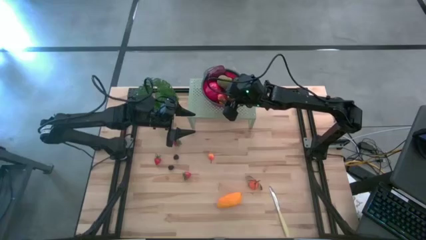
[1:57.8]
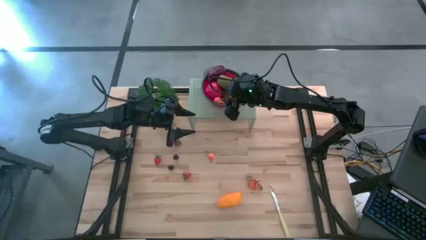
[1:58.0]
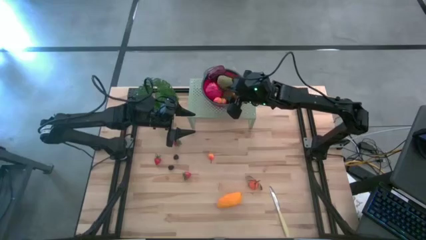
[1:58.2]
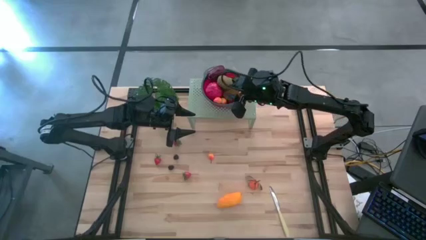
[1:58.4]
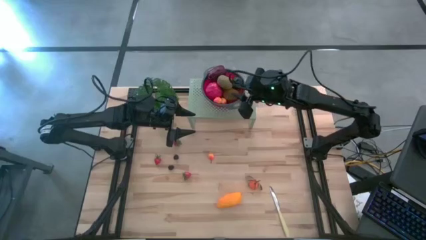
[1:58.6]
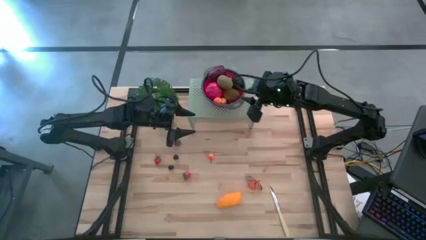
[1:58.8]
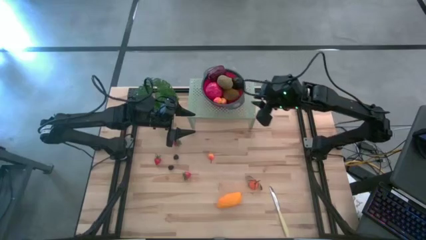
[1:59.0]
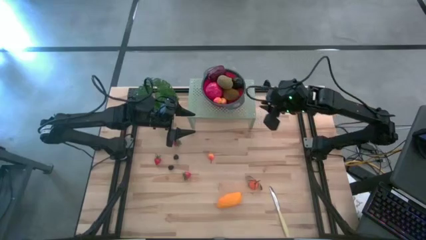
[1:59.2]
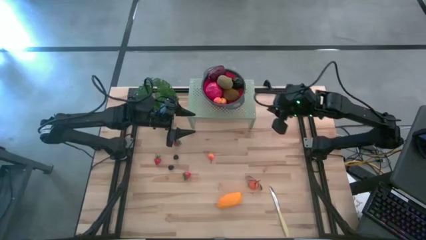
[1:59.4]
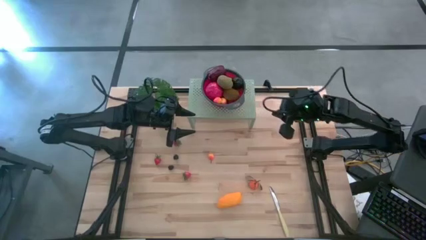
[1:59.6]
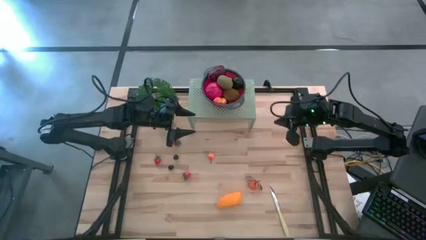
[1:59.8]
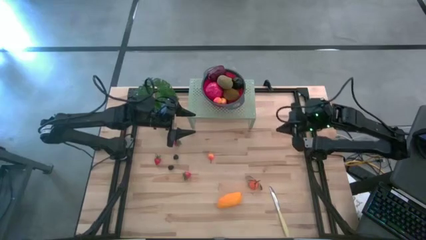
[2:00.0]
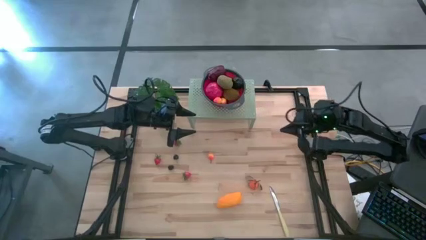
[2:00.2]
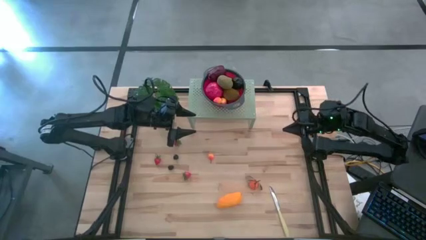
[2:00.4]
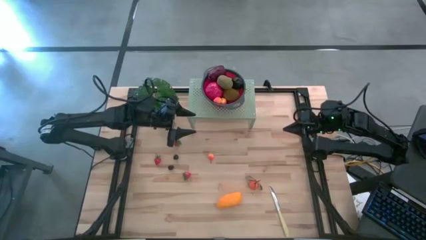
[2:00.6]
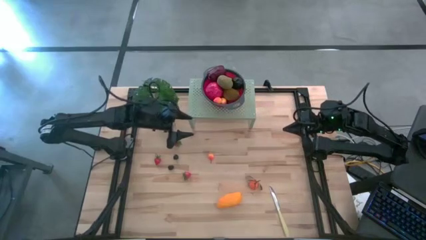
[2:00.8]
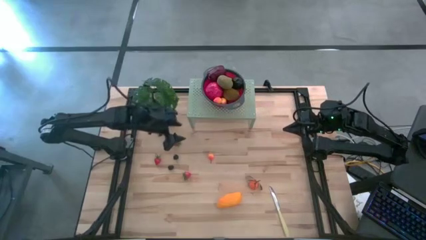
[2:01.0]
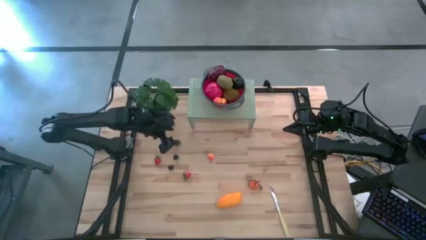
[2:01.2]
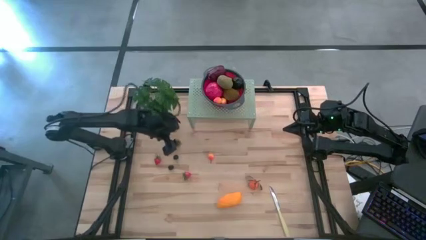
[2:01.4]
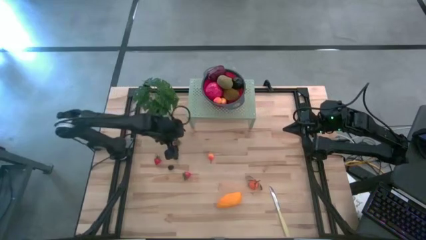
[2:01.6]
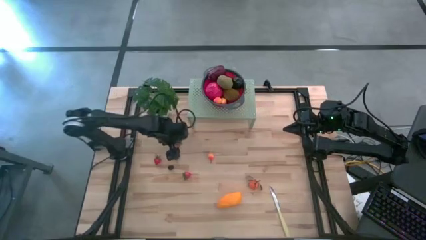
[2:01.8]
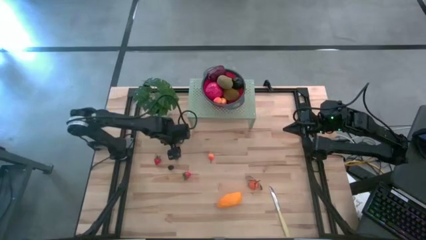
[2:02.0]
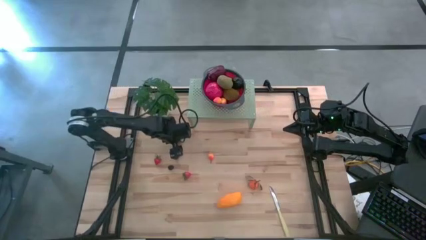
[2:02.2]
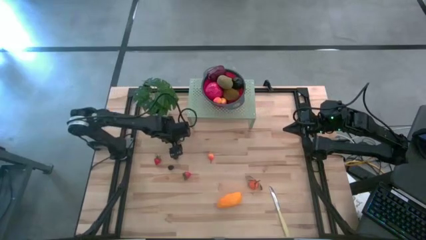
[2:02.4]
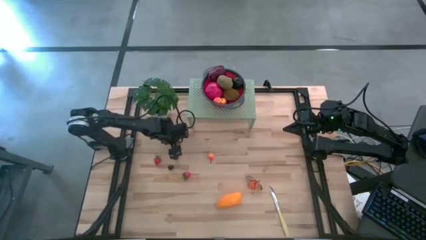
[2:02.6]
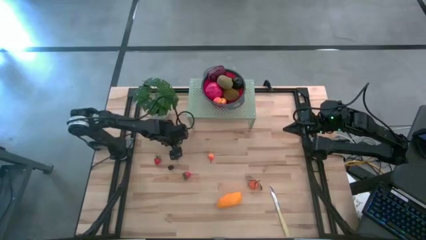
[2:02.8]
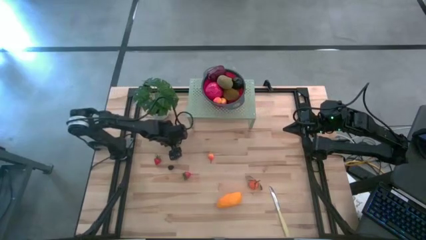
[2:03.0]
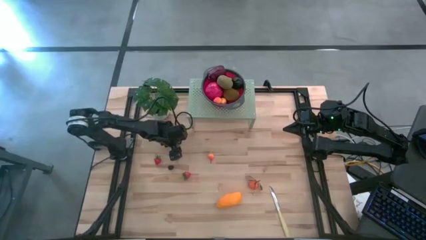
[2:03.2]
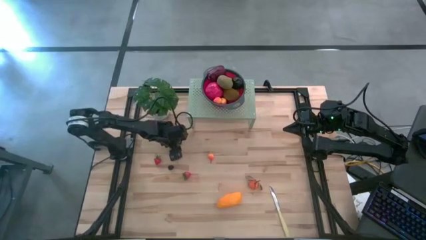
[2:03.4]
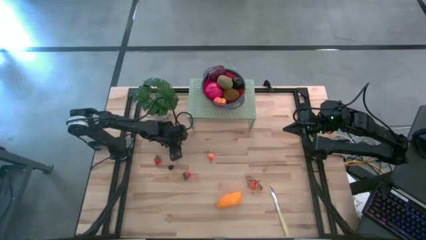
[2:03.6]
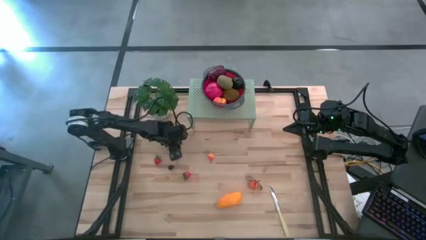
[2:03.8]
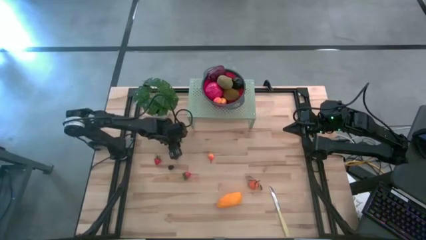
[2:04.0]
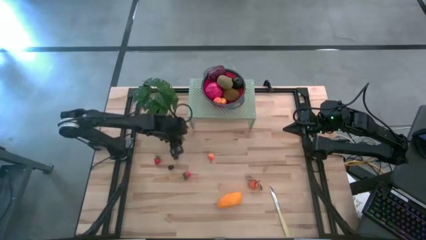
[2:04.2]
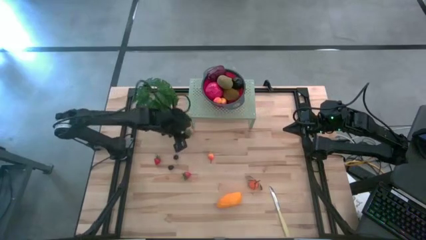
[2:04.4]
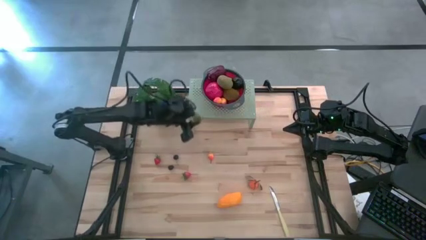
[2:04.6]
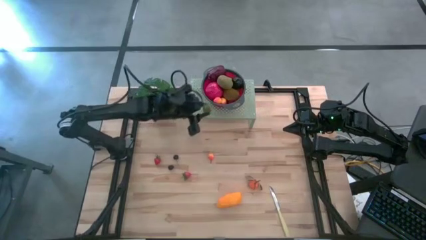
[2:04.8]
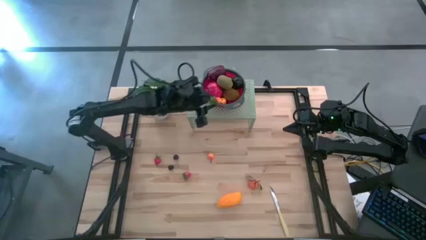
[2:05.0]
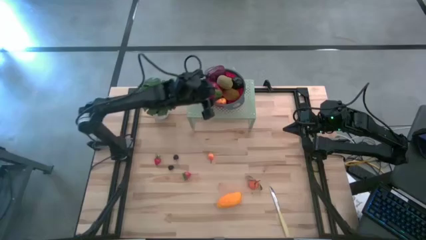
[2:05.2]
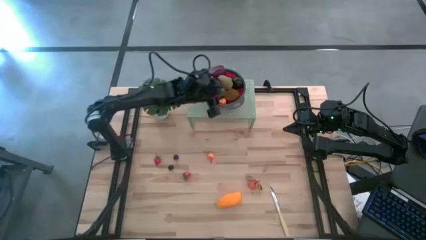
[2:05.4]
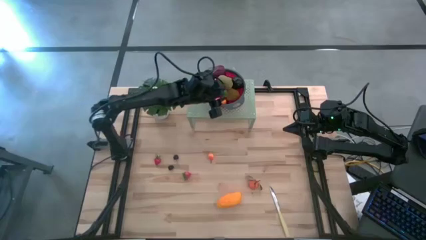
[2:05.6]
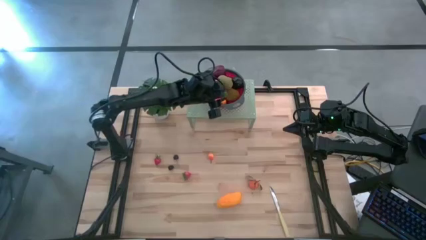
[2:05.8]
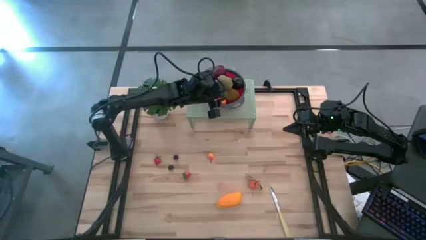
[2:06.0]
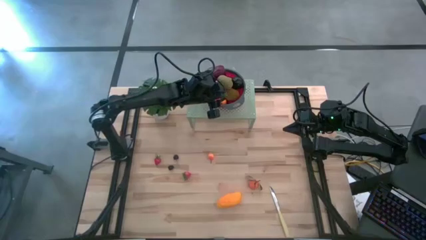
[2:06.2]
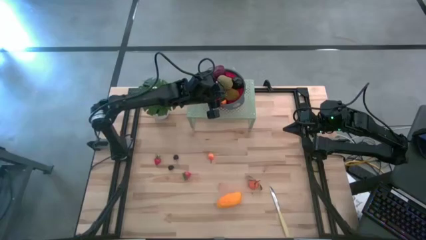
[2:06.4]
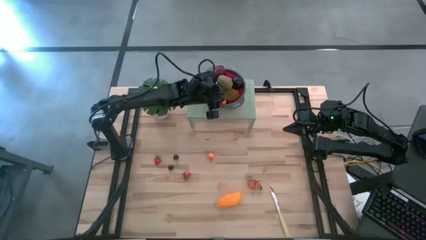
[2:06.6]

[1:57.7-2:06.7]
Task: Pick & Place Fruit
Put the strawberry into the red strainer bowl on the shelf

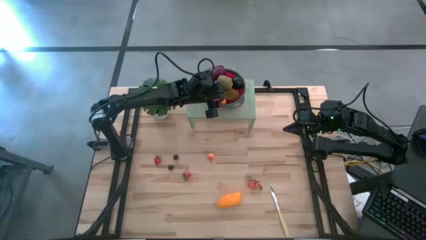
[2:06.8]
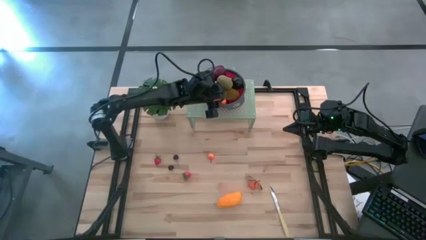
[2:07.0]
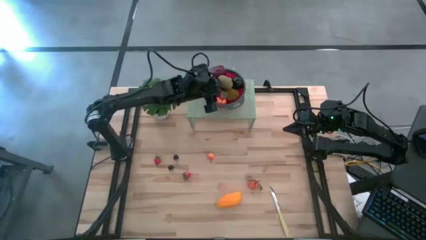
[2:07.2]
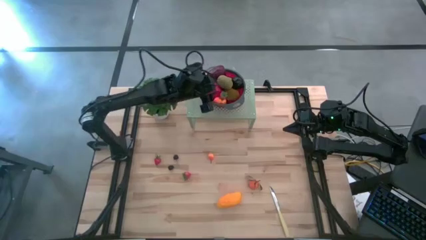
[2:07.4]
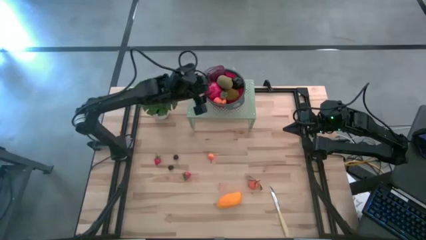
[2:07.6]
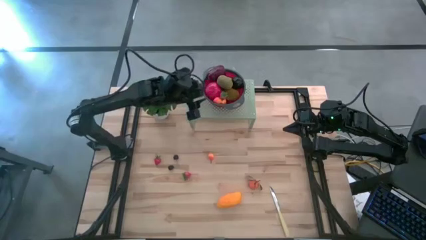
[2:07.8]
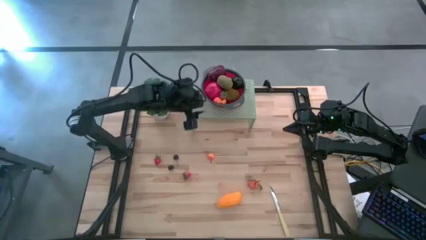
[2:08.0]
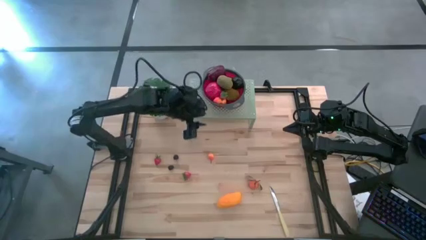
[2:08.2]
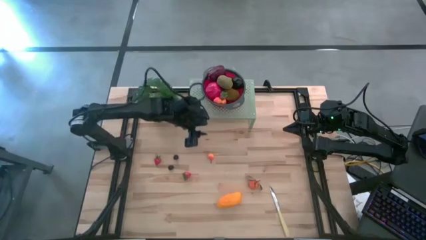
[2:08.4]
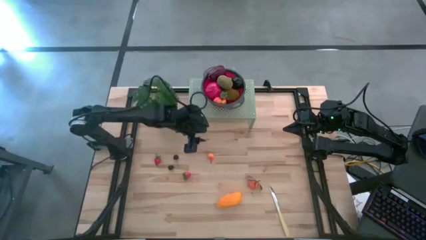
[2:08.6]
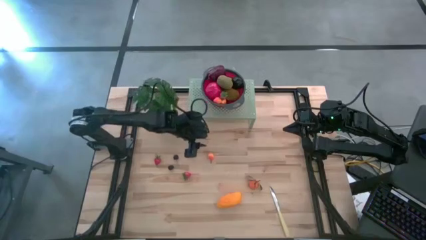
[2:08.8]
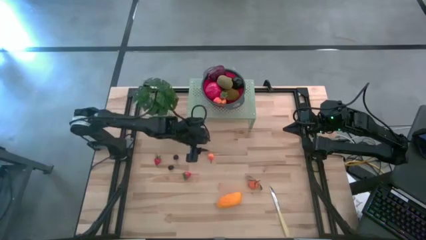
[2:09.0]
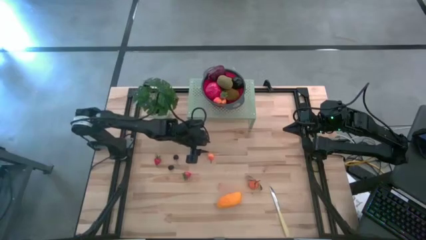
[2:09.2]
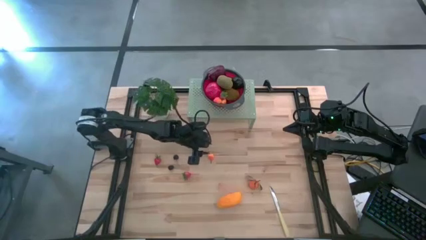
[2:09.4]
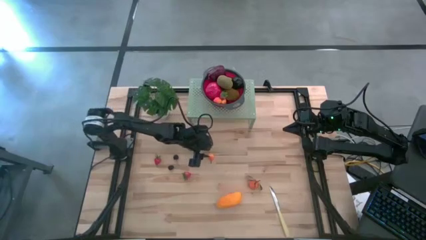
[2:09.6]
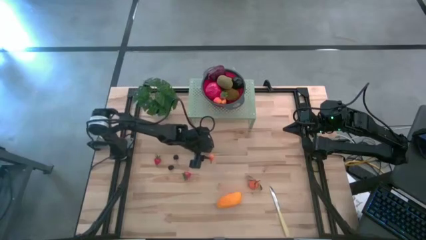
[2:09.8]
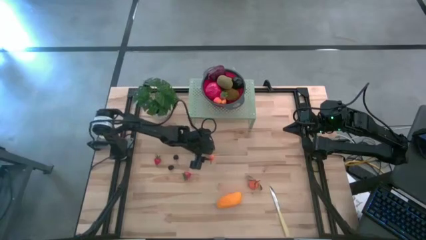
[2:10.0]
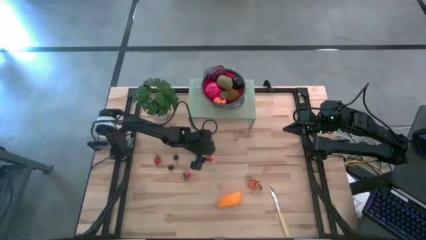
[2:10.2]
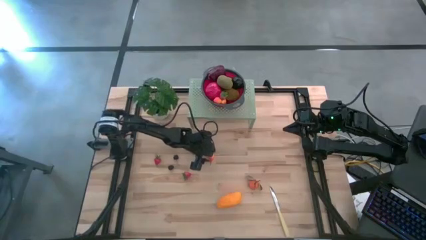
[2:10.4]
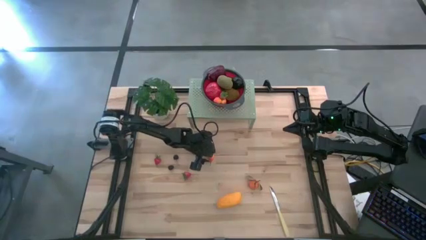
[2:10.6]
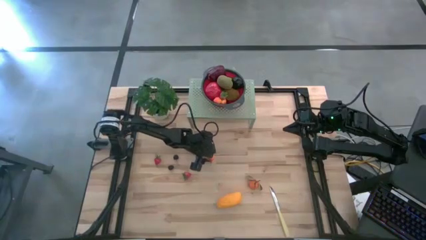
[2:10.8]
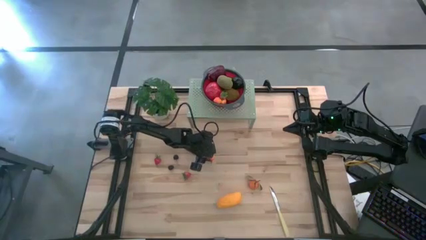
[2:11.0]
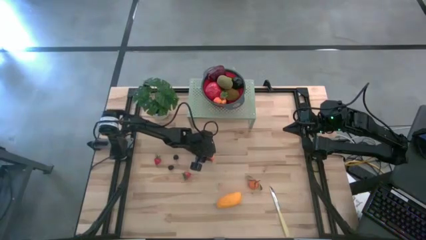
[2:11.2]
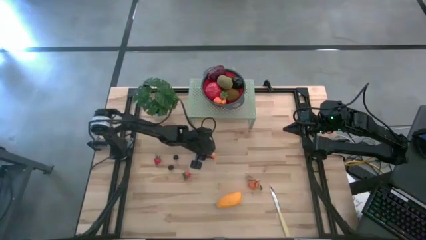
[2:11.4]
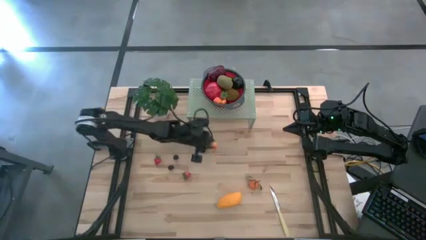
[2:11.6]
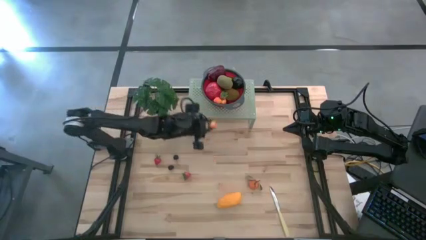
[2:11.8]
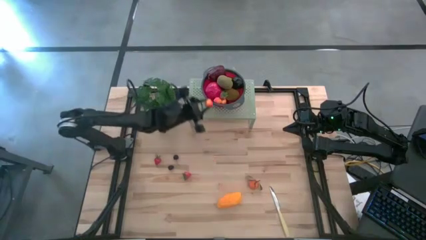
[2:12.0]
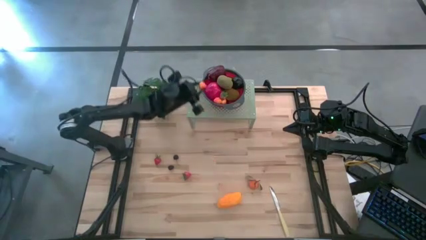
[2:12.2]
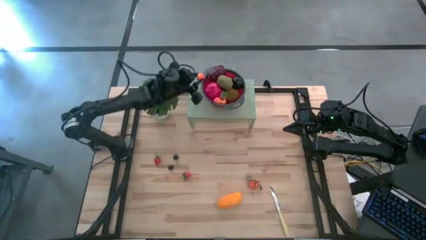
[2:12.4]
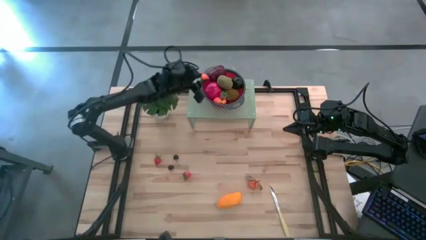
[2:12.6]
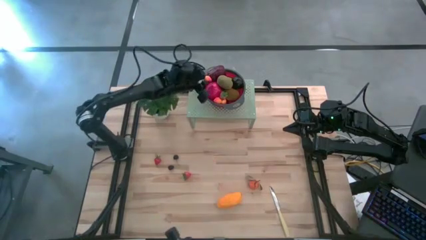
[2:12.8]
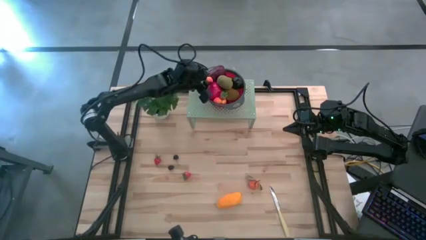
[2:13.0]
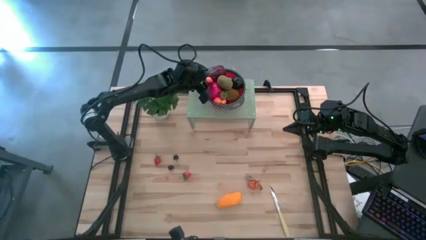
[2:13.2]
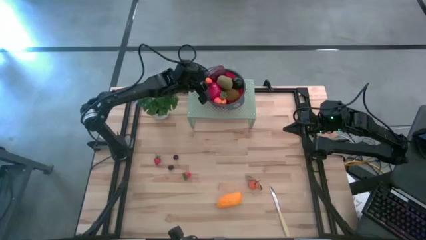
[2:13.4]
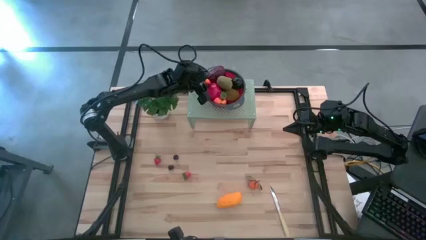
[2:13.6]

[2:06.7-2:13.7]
Put the peach into the red strainer bowl on the shelf
